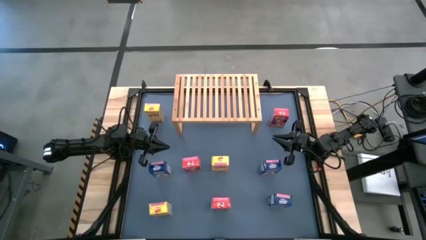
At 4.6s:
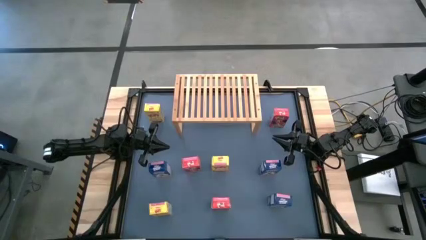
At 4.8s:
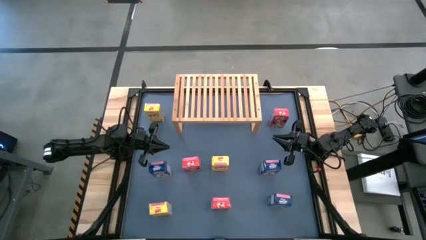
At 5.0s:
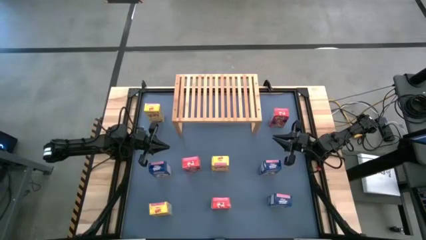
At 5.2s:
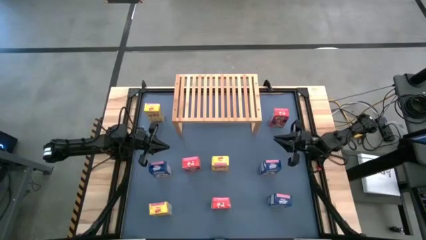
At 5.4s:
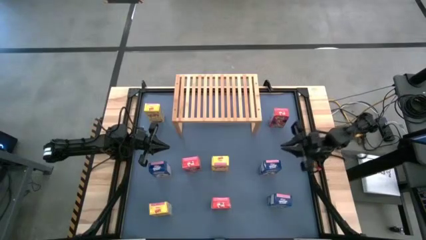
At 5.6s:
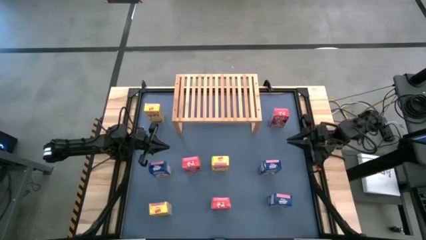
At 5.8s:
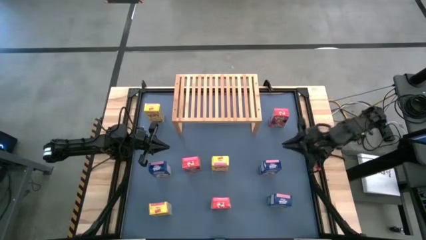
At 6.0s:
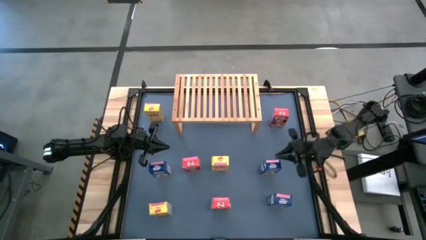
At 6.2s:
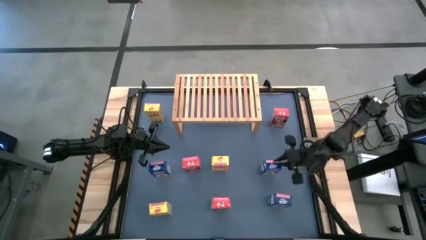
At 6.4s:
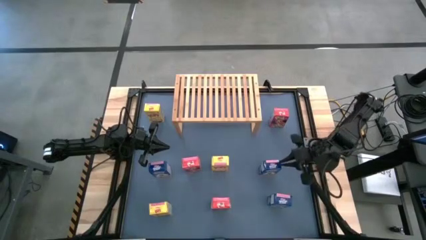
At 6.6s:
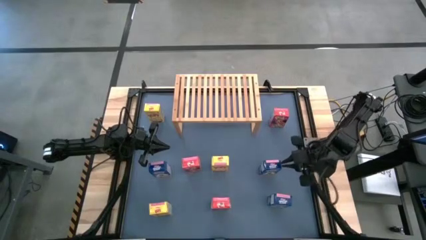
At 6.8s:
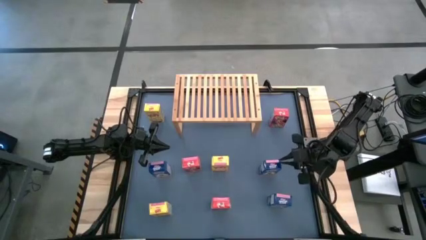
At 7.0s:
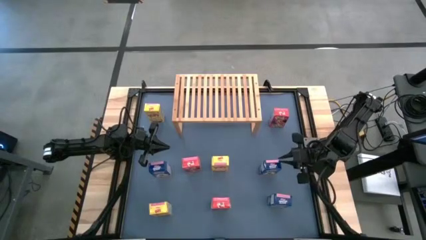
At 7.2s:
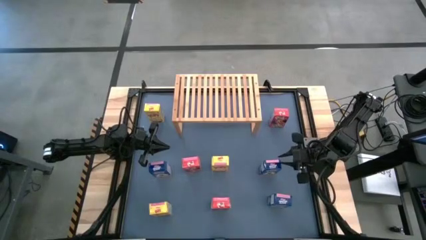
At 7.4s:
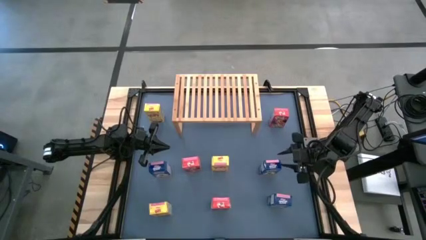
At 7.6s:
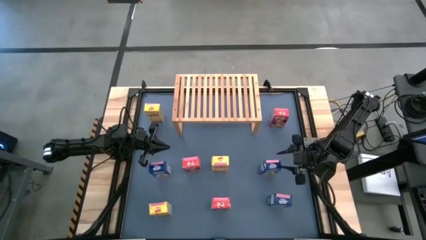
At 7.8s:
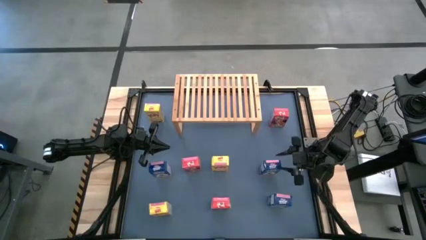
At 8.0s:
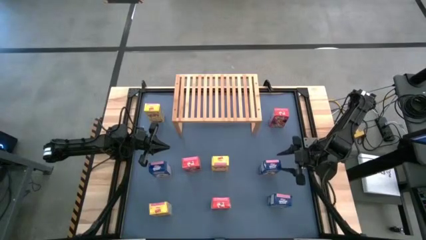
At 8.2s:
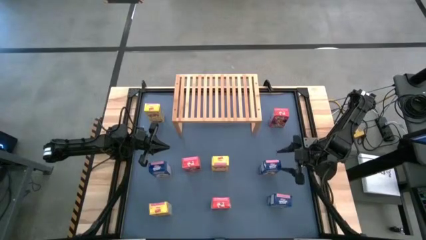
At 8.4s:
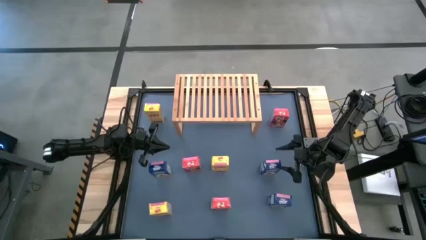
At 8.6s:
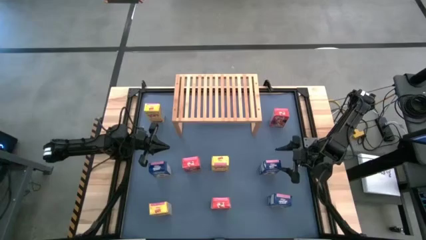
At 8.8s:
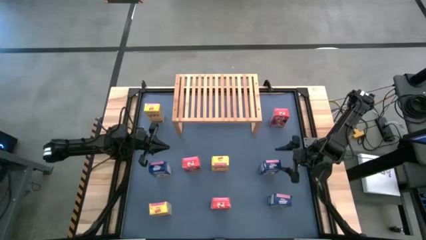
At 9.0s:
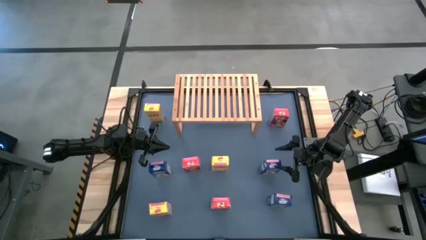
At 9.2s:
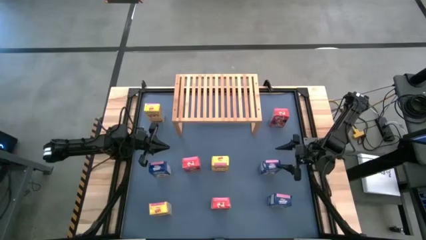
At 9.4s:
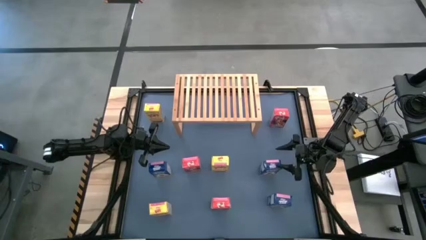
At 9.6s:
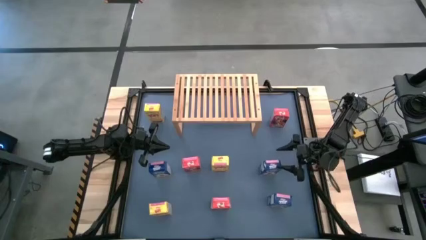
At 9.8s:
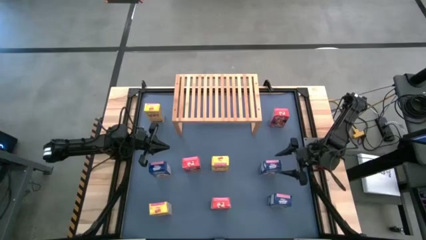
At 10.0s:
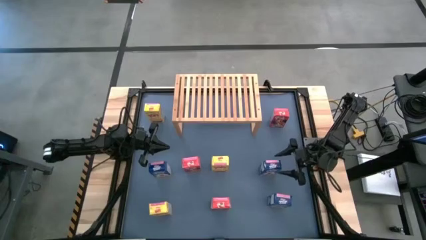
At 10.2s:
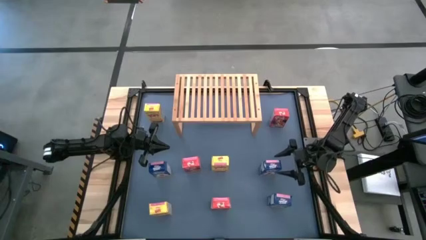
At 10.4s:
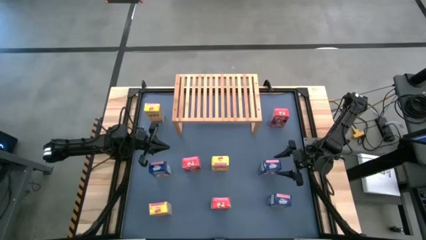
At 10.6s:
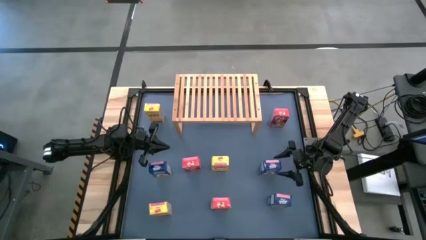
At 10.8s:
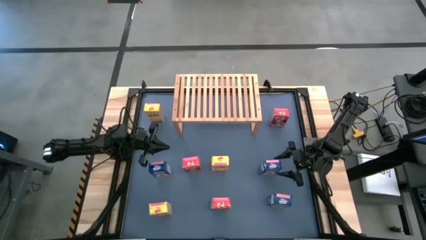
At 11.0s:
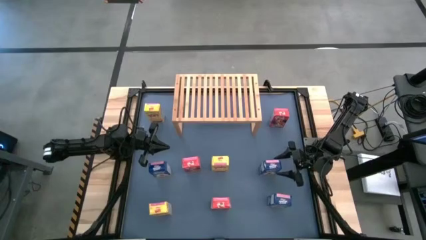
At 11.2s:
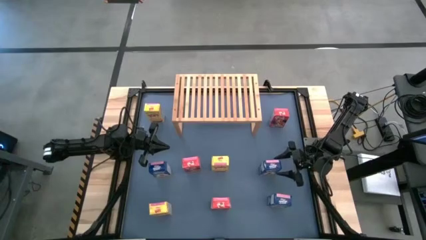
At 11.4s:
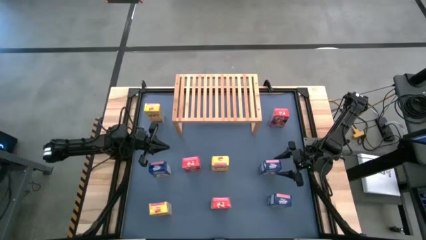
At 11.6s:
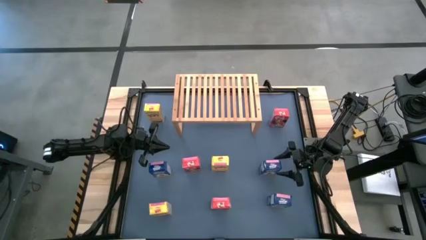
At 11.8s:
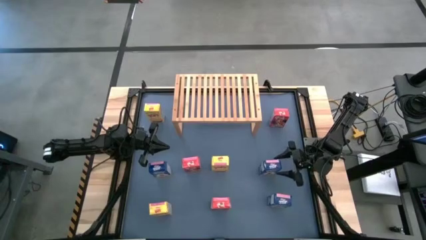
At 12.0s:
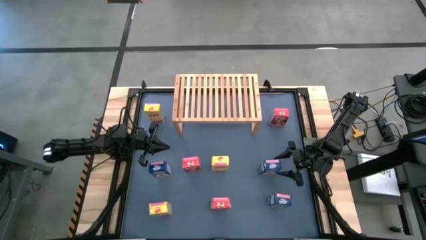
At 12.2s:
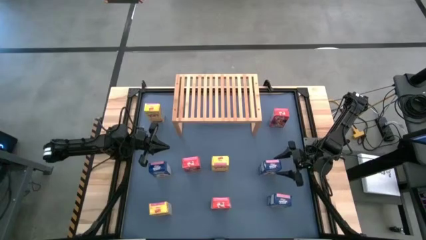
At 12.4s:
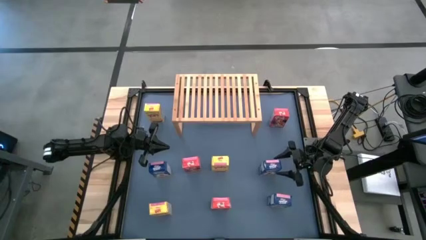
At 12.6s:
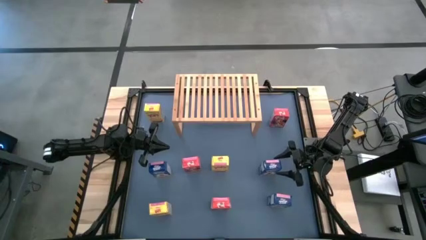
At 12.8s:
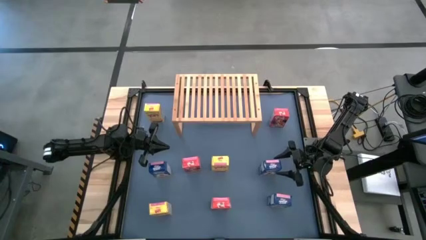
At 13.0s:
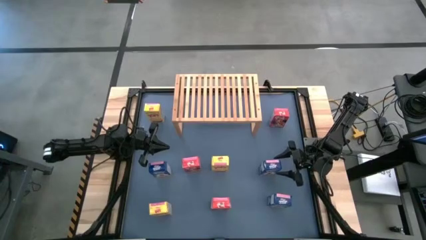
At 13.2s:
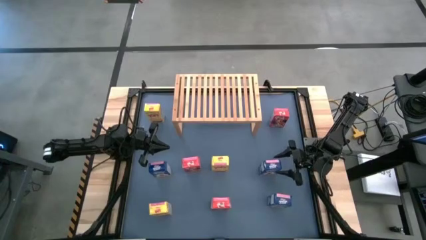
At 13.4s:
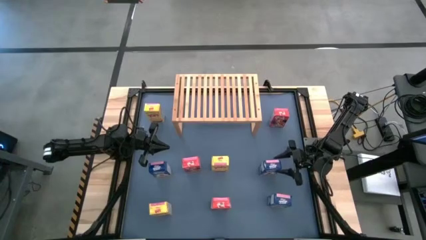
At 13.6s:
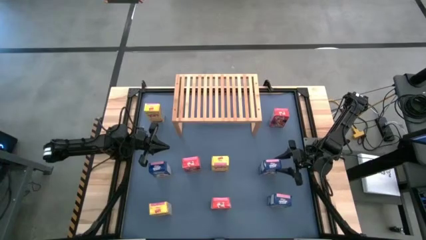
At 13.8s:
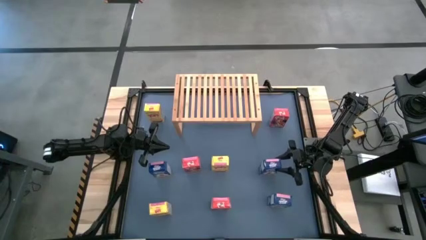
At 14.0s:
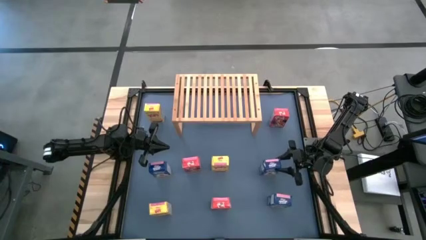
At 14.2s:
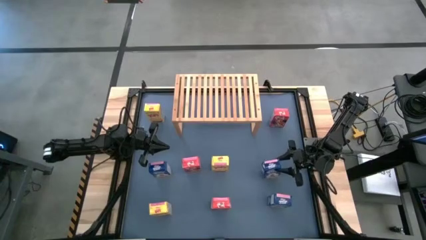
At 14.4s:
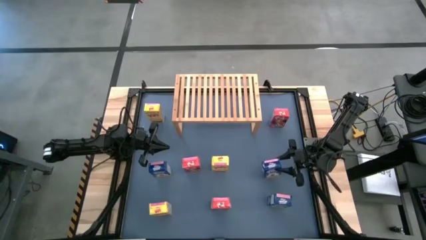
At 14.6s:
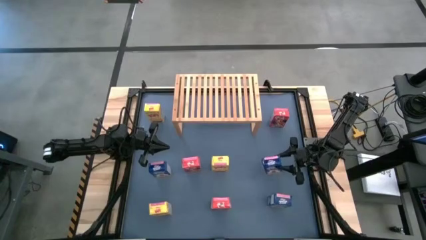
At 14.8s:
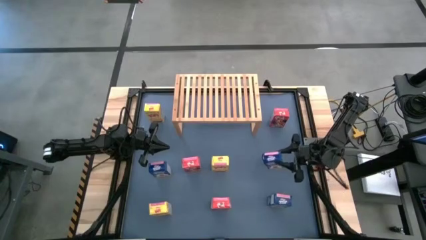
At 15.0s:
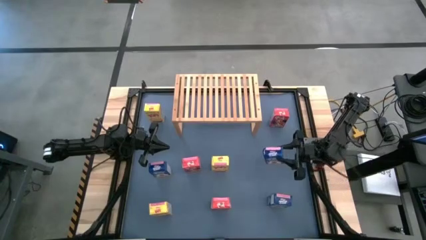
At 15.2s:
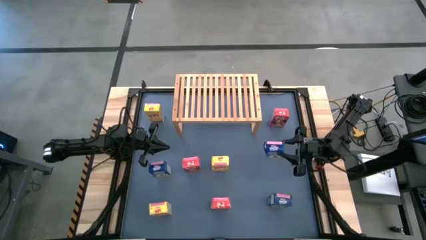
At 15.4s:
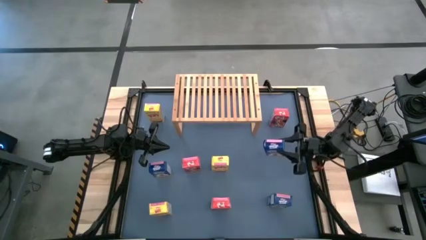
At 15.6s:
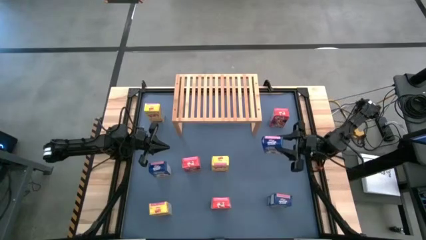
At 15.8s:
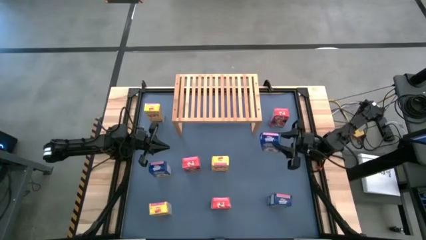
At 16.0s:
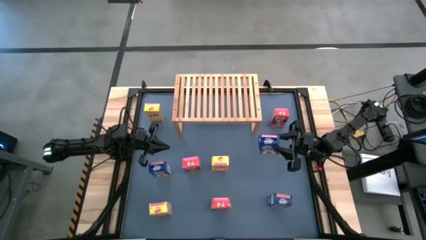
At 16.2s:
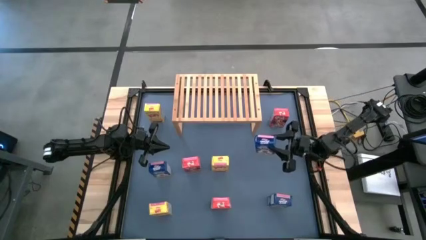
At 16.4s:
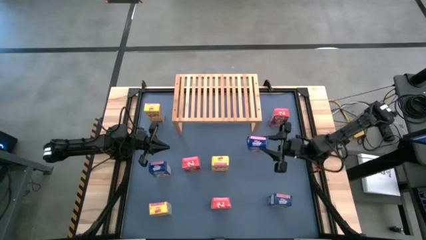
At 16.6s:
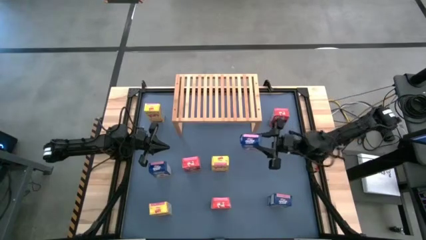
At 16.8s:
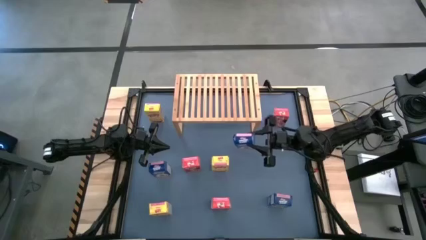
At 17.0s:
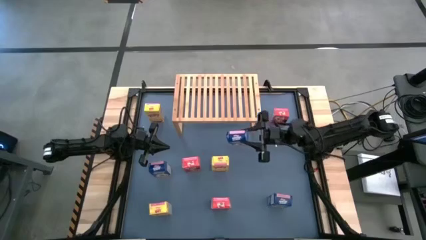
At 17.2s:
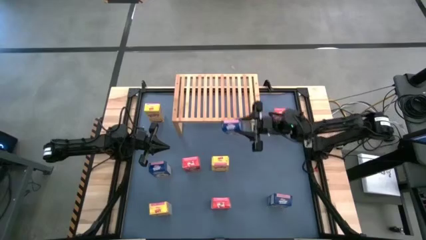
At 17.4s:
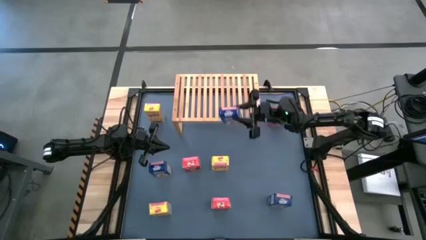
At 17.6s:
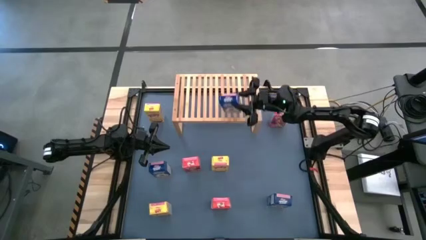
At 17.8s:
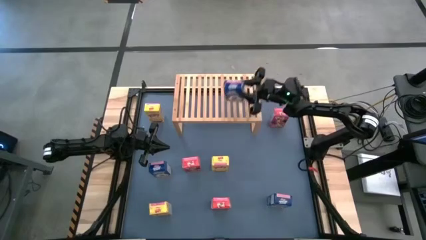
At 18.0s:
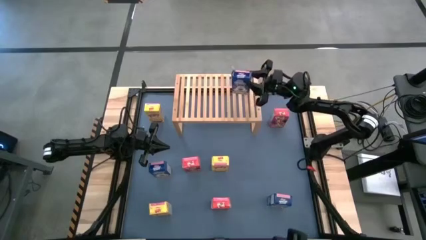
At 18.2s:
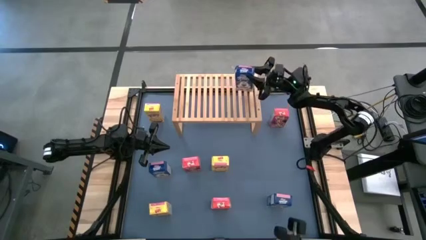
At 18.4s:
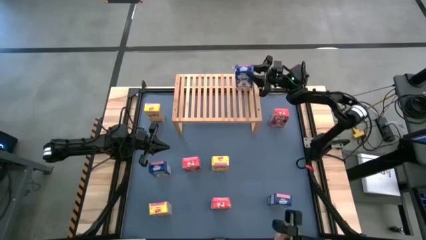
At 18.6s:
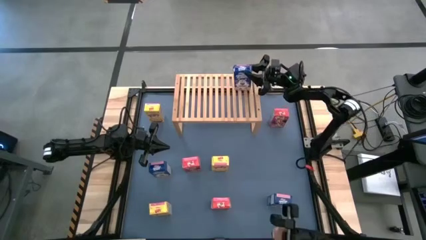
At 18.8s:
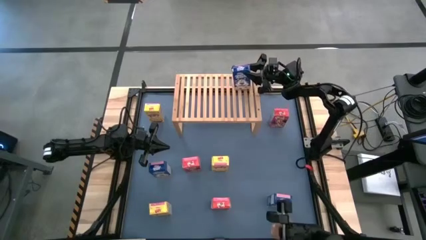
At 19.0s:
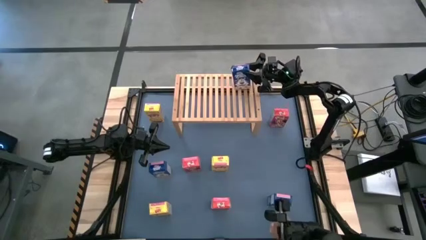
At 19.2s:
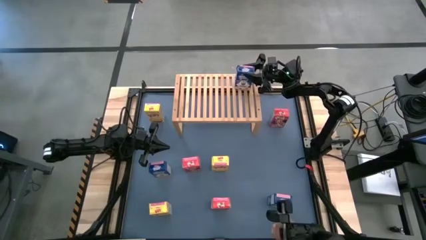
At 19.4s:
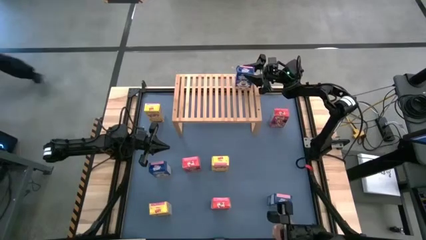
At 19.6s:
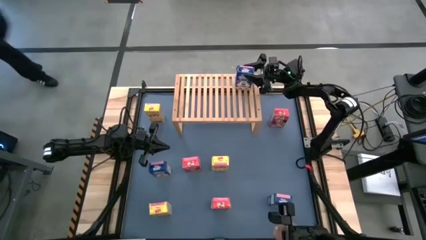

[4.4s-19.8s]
Task: Stack cereal on shelf
Put the top right blue cereal box on the shelf
